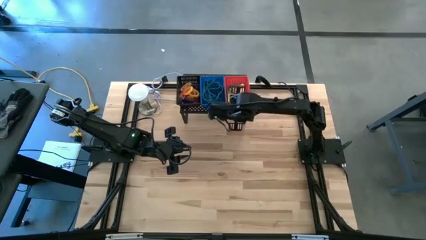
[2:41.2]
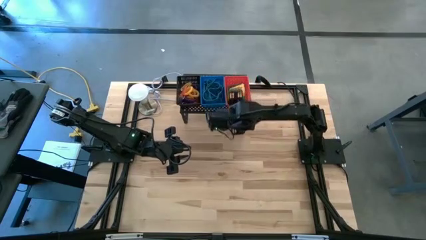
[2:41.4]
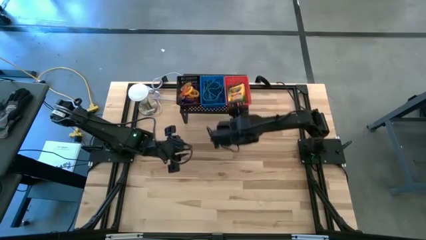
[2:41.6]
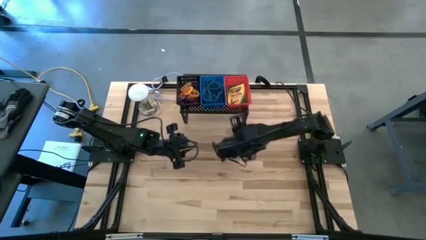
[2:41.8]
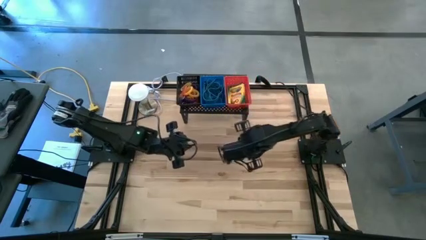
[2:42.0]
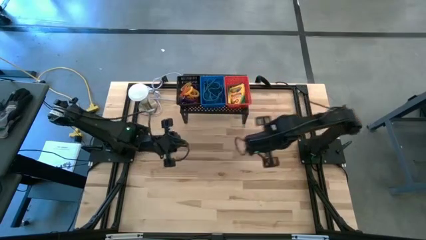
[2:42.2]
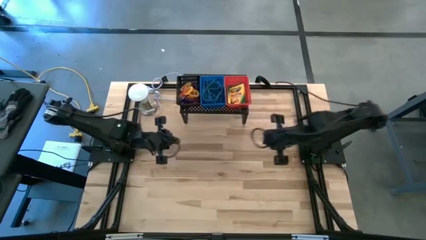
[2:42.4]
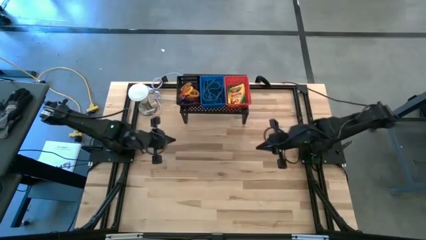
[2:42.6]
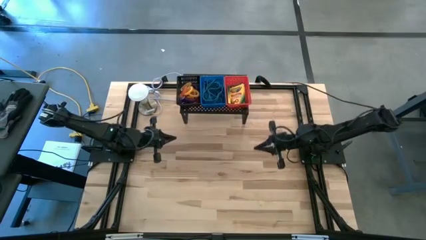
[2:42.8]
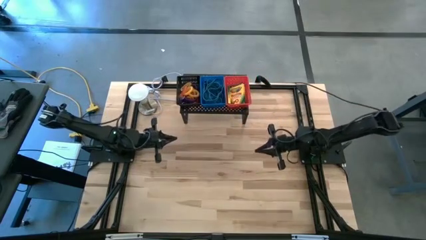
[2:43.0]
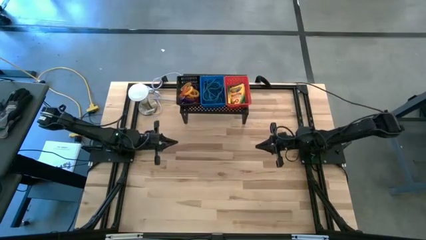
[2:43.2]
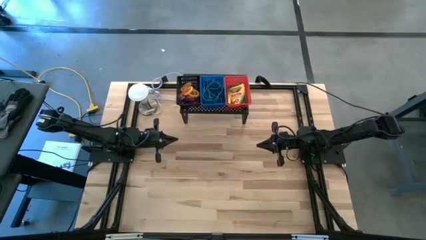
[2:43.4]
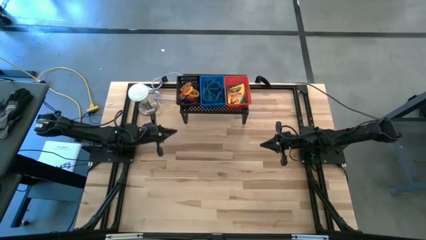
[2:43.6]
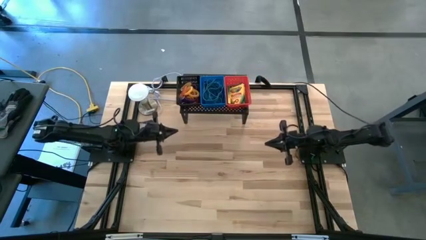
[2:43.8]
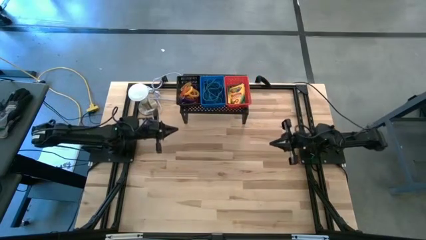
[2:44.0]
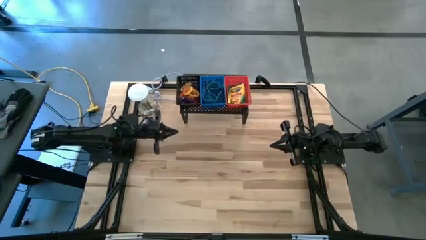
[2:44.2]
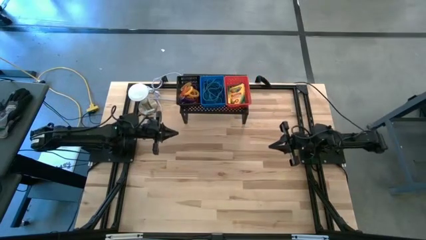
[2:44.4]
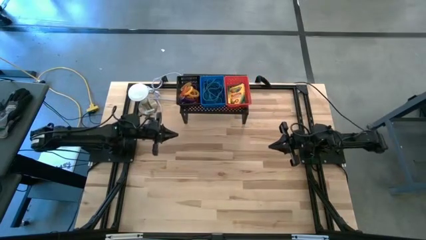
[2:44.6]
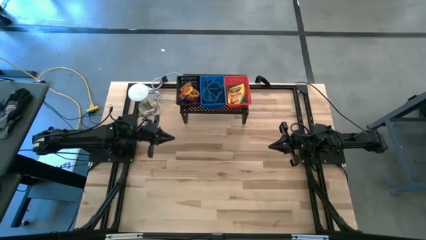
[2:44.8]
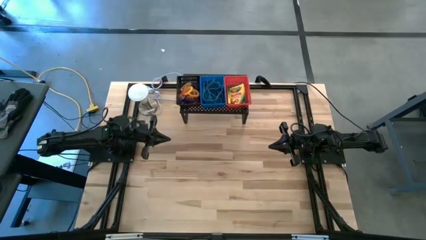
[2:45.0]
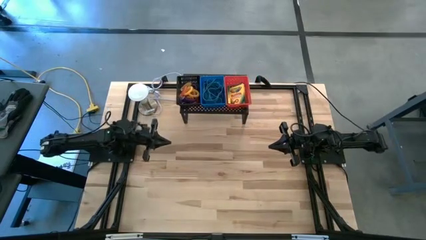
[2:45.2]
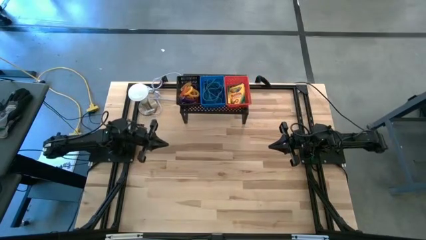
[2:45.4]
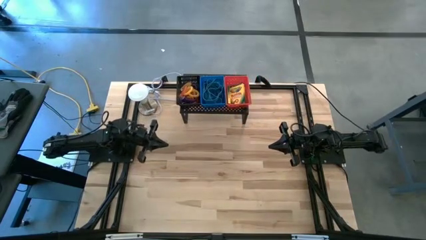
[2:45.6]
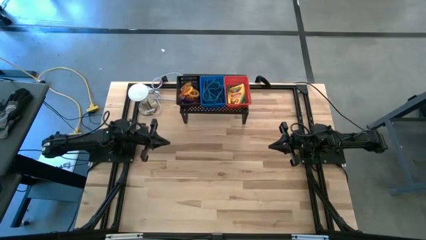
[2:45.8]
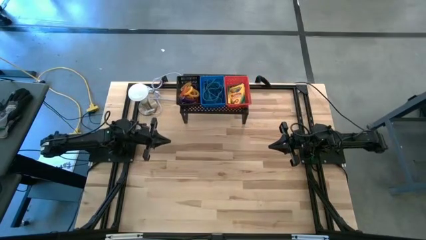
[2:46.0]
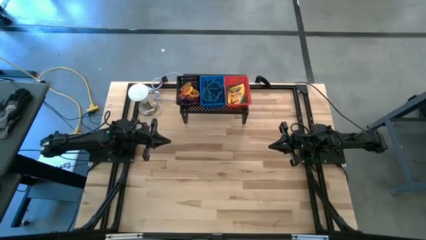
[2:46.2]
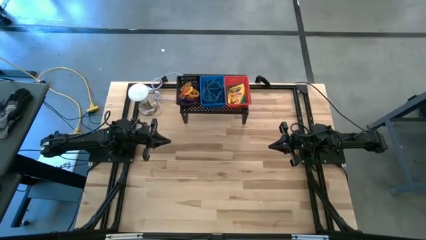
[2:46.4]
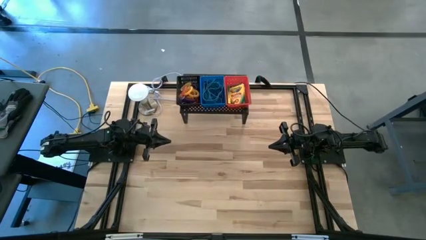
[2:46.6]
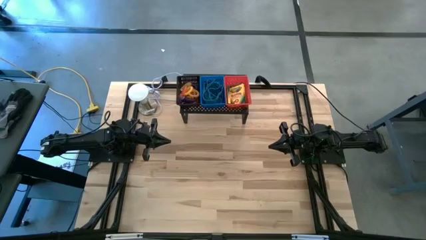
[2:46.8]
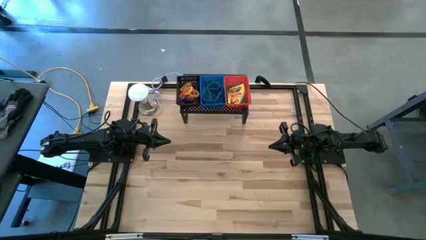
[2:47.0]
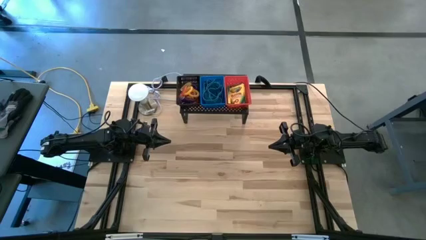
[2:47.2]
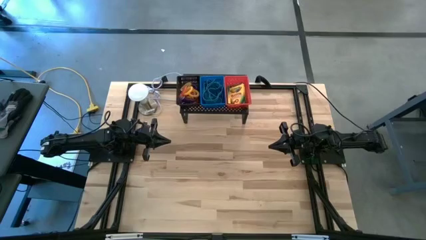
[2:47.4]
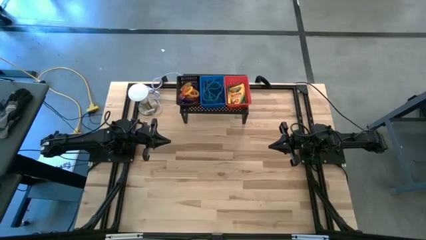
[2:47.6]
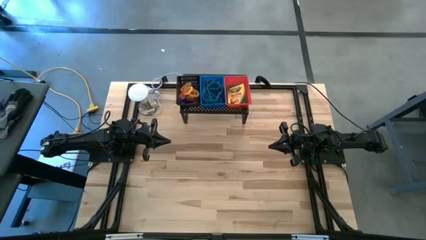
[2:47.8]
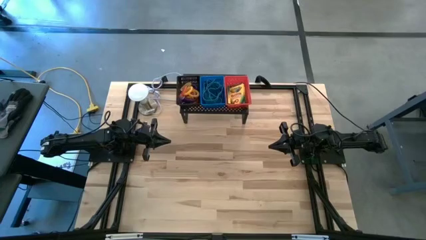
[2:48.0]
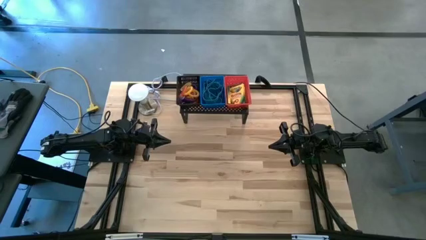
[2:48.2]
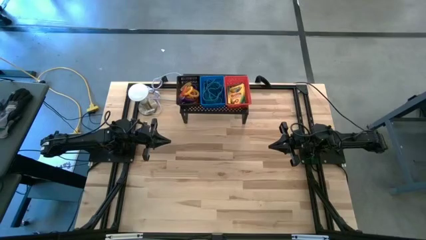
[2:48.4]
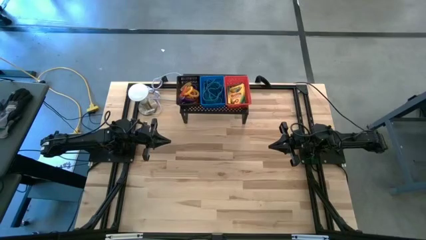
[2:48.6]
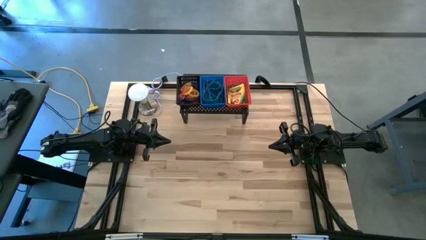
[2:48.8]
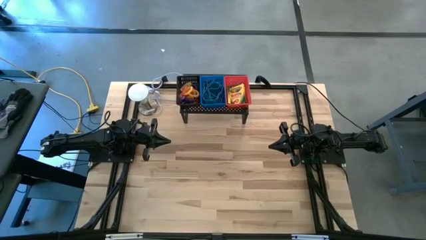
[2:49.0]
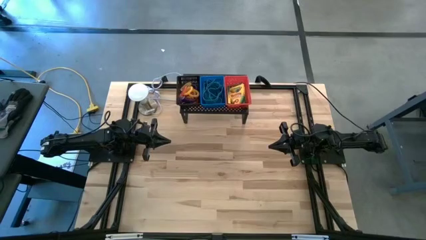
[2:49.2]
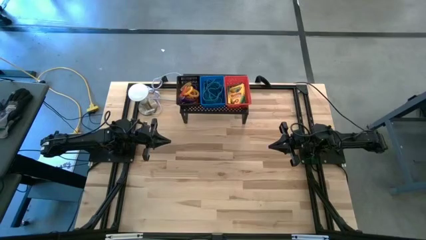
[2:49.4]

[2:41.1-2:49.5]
Task: Pick & Place Office Desk Supplies
Return to Home Position

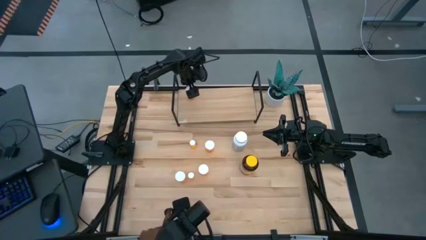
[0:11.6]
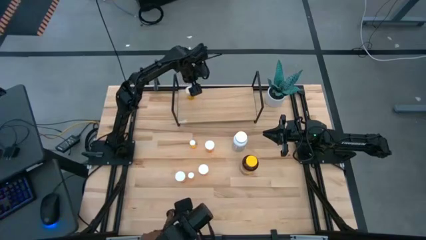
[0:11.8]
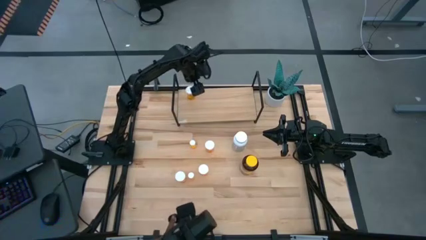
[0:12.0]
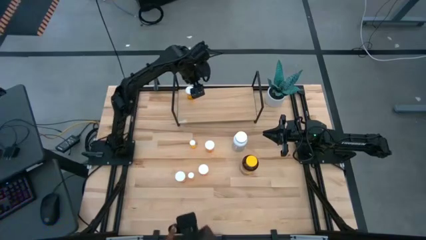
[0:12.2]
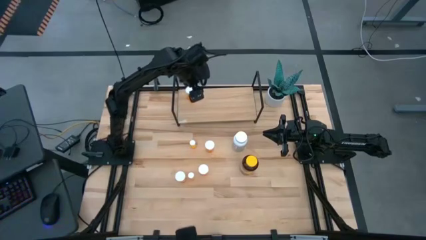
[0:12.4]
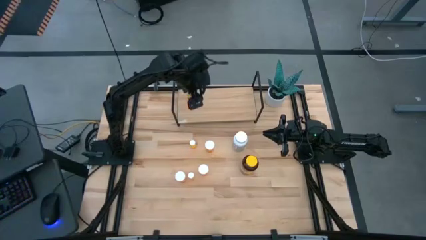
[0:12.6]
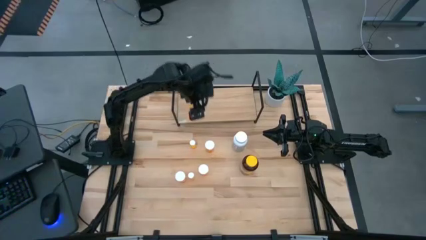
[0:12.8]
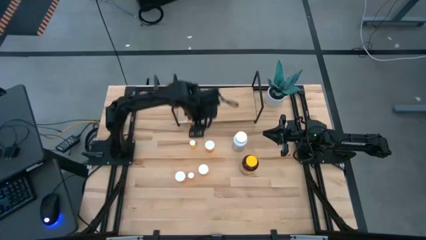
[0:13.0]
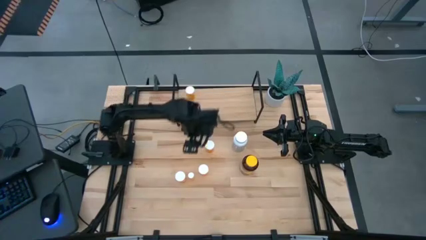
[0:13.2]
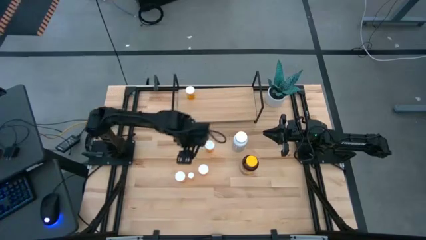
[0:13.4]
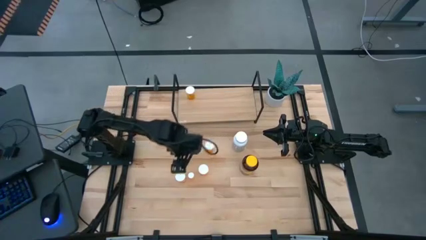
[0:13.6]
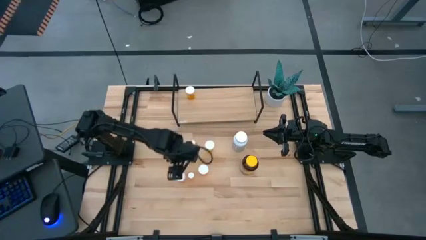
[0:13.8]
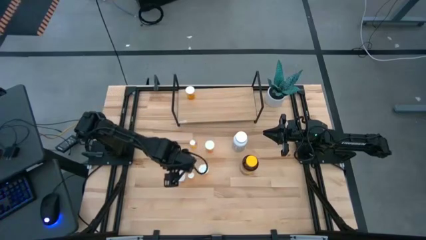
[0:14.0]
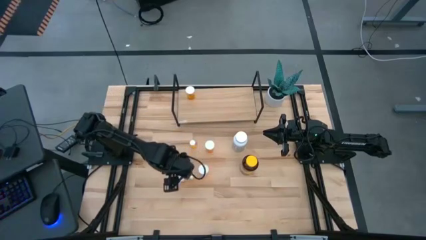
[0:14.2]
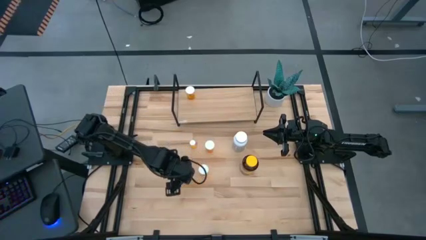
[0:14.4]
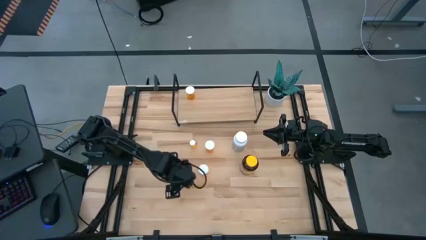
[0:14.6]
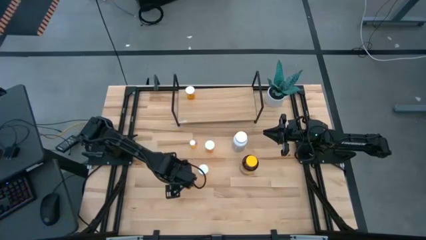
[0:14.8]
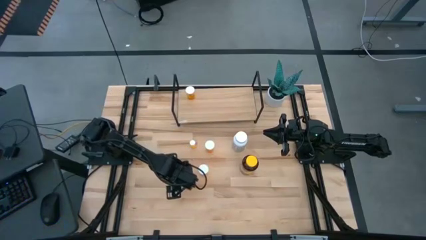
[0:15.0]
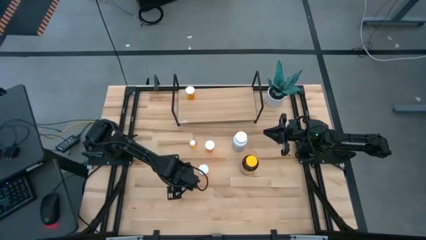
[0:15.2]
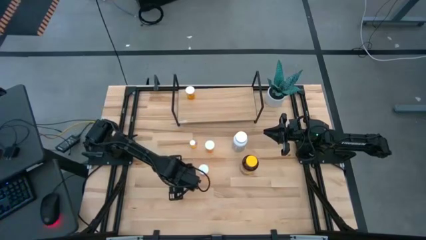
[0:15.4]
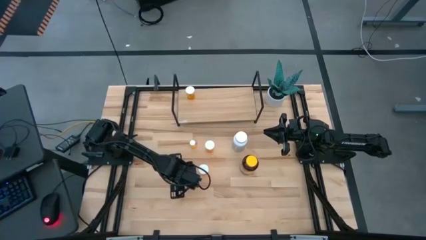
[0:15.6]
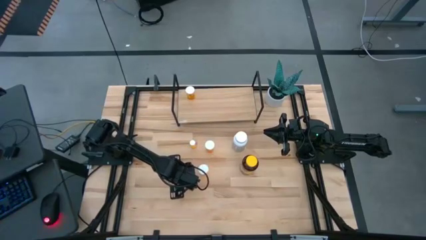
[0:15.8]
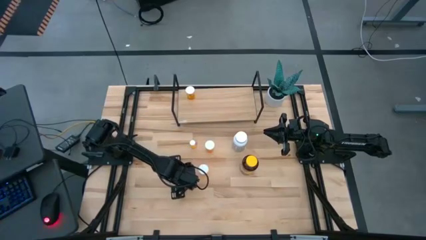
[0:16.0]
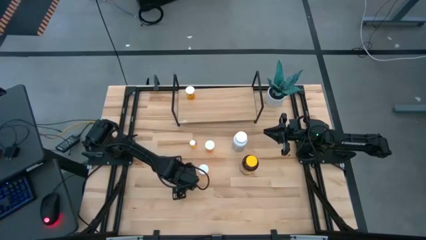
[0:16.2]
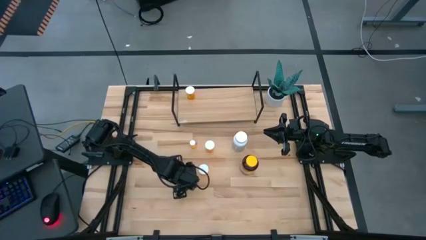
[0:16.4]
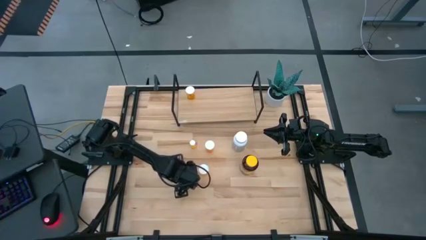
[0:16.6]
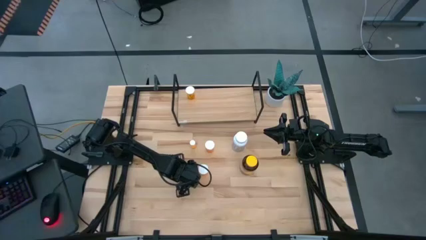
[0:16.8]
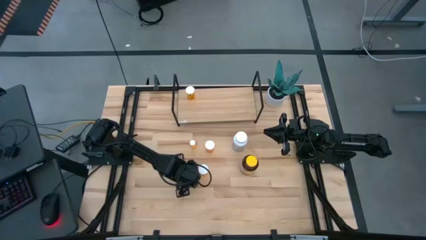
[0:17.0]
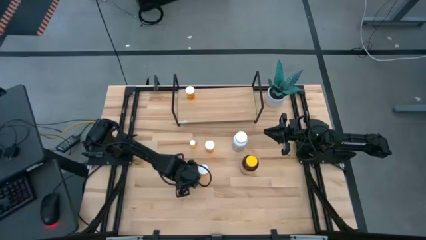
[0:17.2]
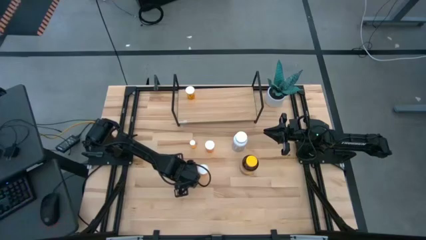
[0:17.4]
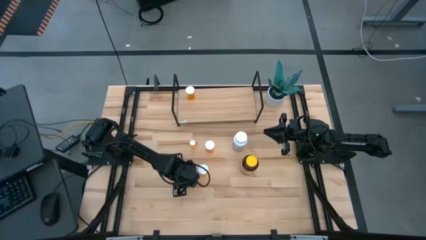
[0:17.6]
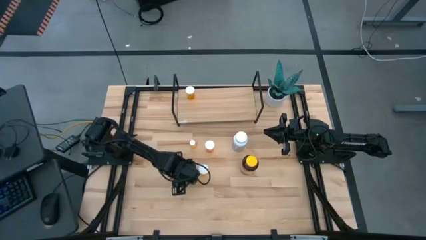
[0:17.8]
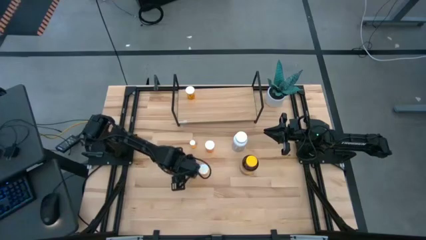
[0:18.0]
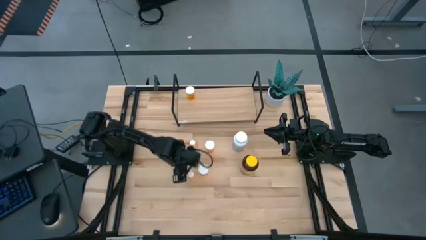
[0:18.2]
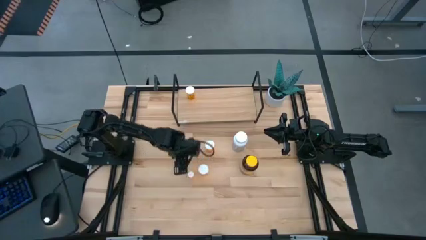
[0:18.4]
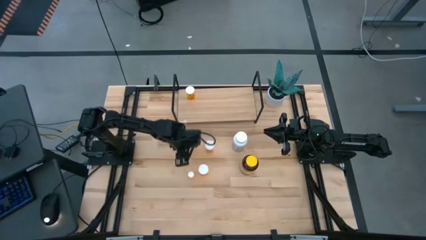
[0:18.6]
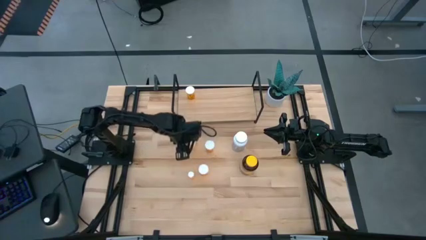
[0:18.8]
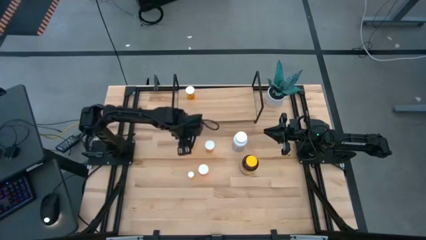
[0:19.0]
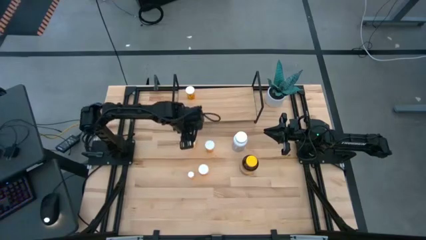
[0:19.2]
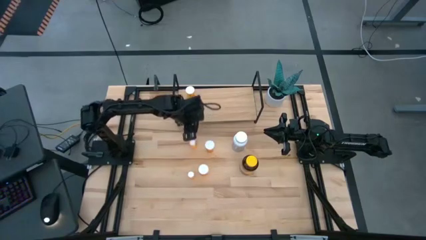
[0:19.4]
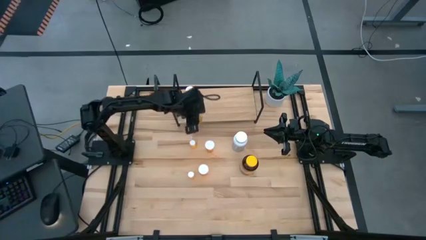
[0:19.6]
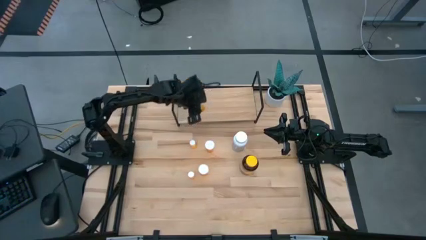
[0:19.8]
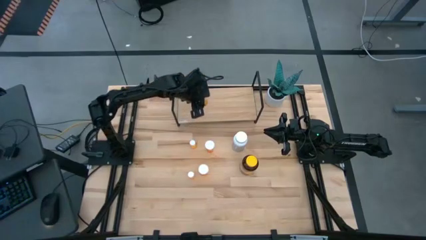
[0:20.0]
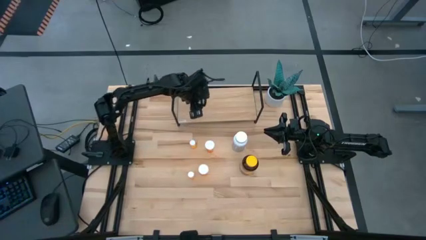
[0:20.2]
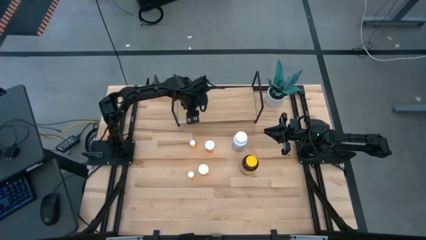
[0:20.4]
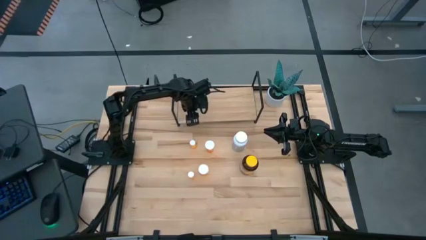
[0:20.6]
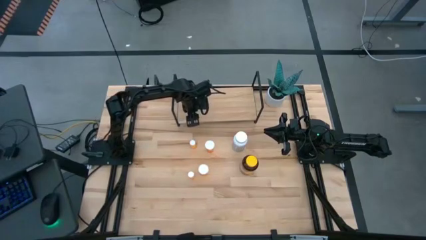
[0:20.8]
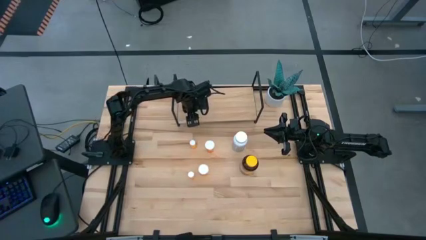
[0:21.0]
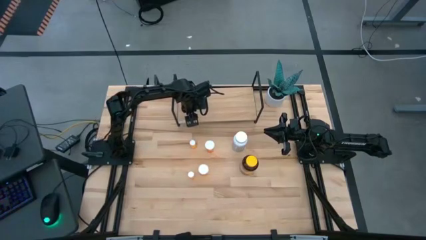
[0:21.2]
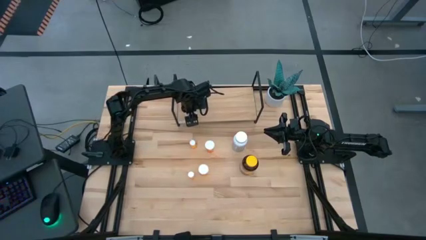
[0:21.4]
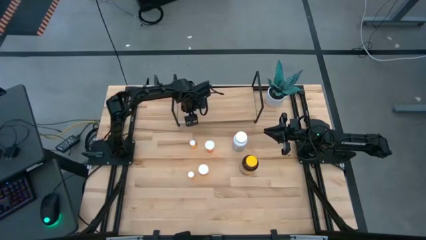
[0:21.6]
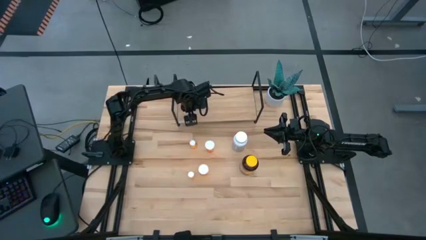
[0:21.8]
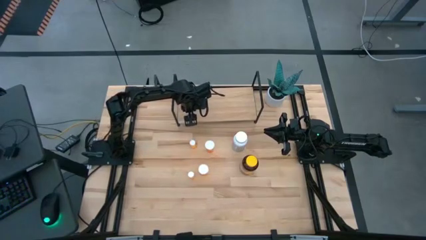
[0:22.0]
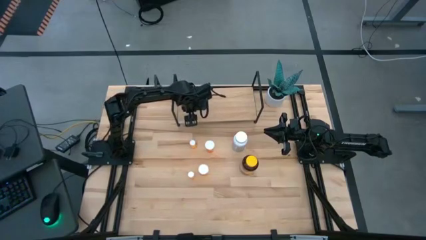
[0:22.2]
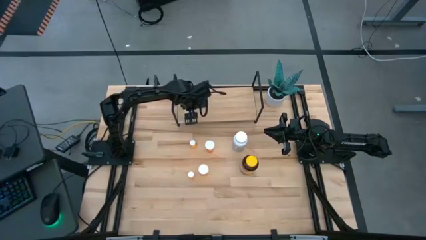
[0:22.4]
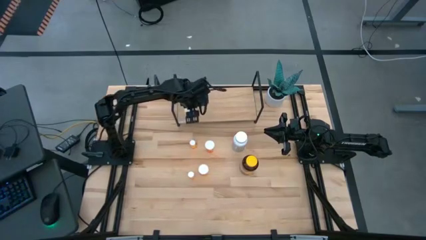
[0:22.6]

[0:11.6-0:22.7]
Task: Pick and place medicine bottles onto shelf by color
Put the bottom left big orange pill bottle on the shelf
